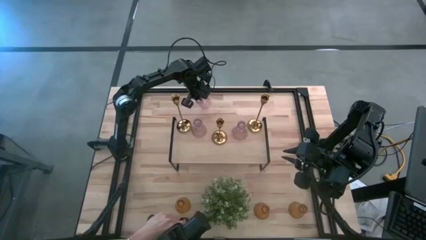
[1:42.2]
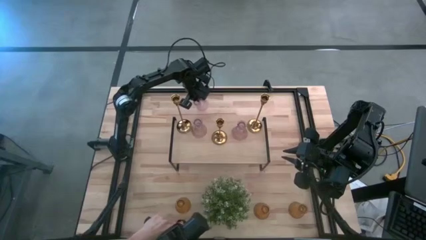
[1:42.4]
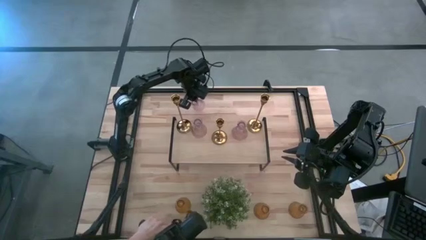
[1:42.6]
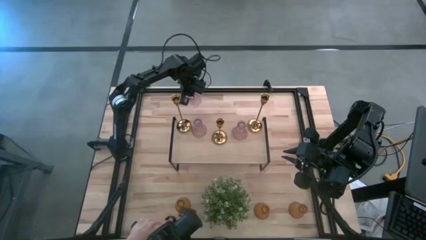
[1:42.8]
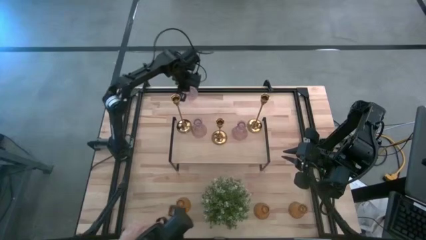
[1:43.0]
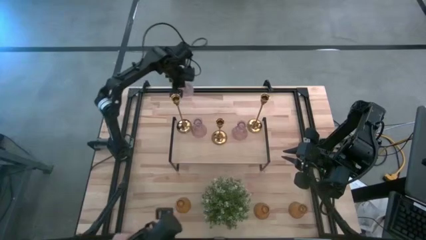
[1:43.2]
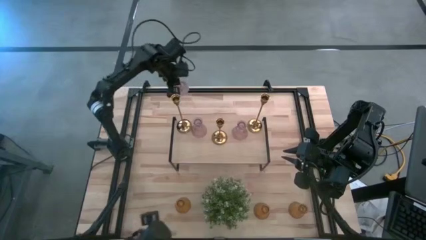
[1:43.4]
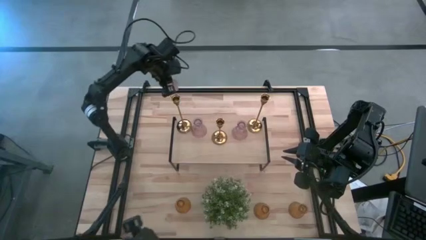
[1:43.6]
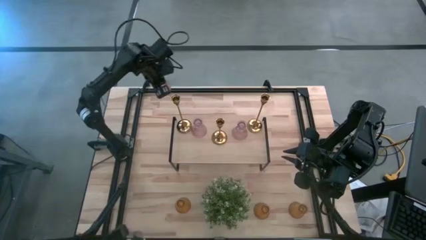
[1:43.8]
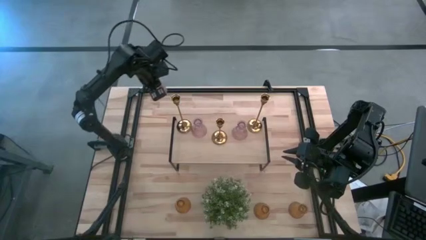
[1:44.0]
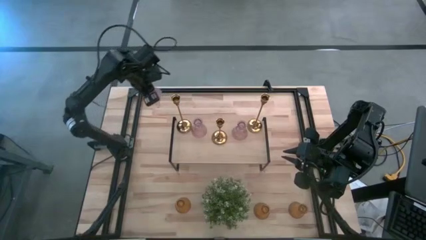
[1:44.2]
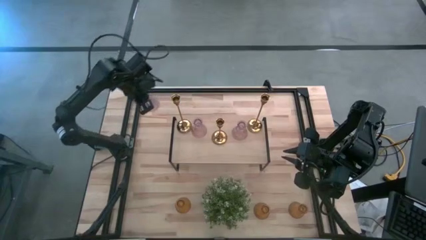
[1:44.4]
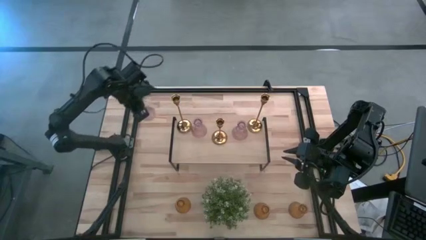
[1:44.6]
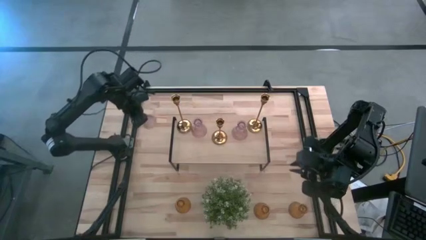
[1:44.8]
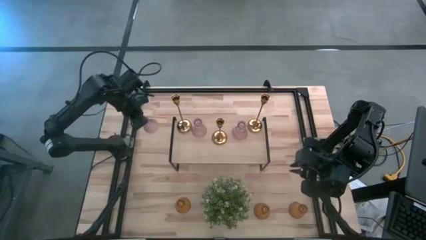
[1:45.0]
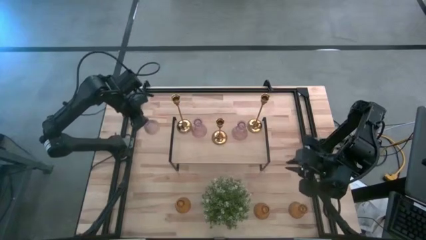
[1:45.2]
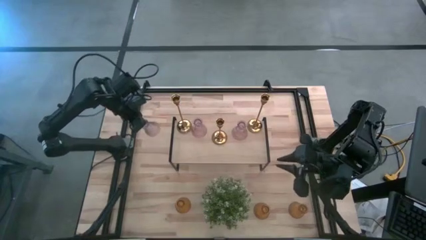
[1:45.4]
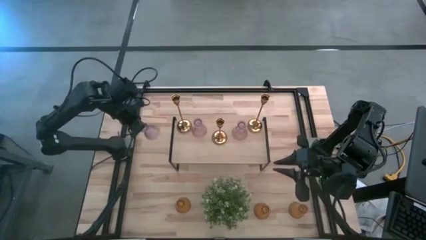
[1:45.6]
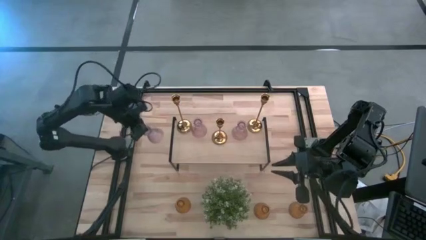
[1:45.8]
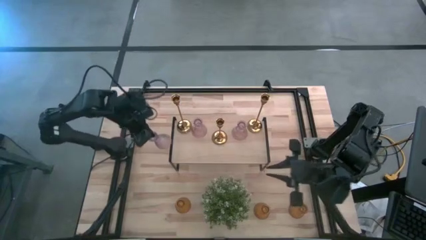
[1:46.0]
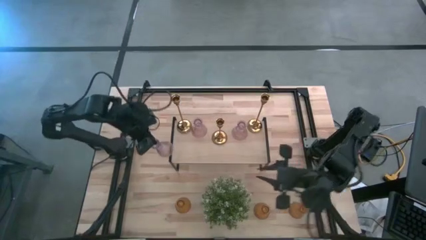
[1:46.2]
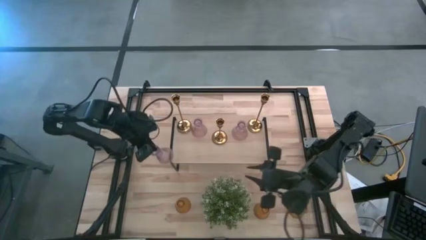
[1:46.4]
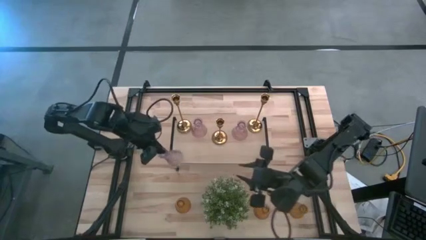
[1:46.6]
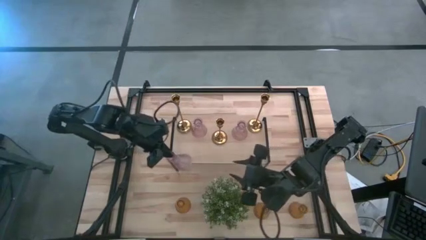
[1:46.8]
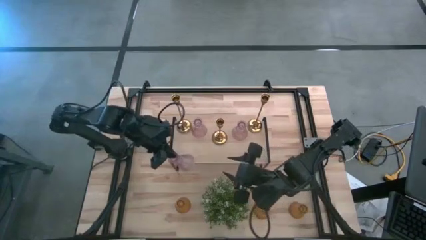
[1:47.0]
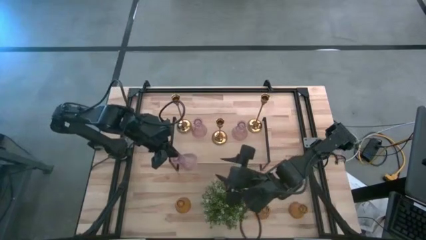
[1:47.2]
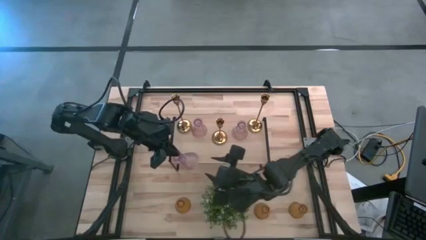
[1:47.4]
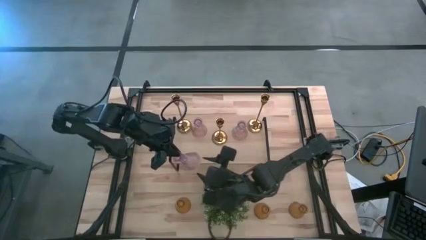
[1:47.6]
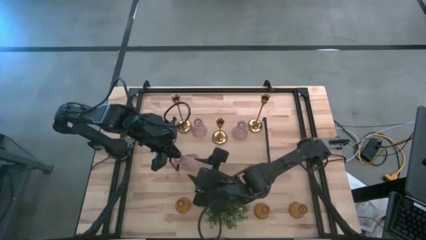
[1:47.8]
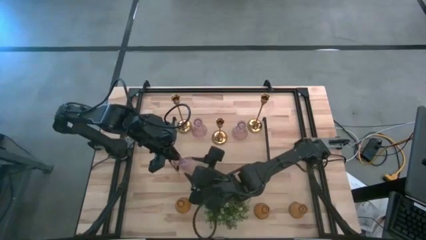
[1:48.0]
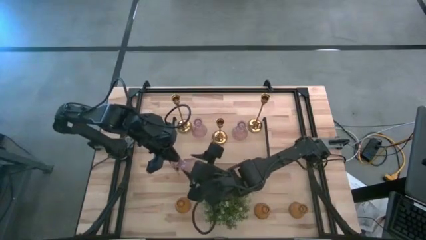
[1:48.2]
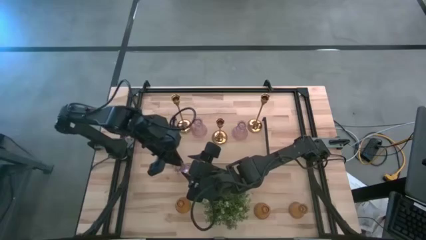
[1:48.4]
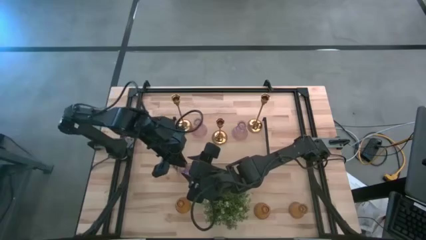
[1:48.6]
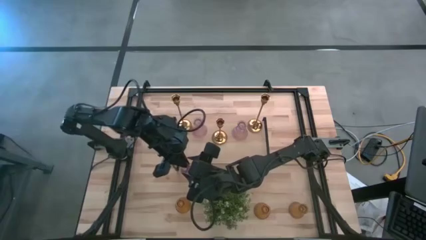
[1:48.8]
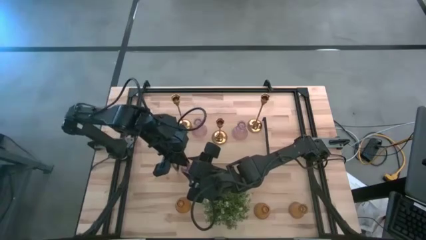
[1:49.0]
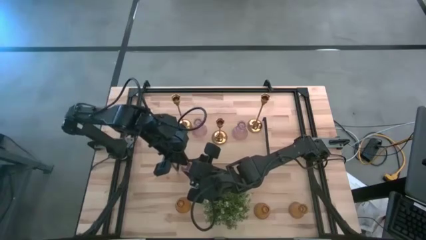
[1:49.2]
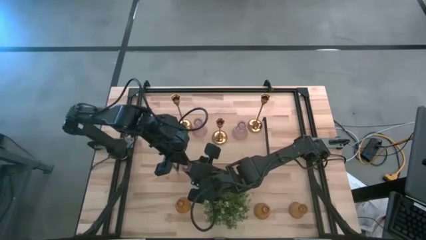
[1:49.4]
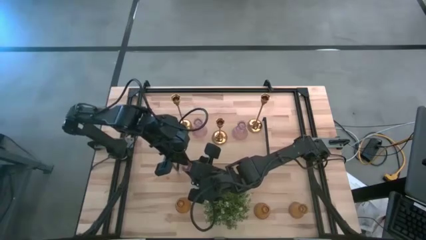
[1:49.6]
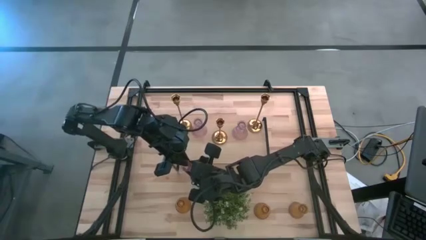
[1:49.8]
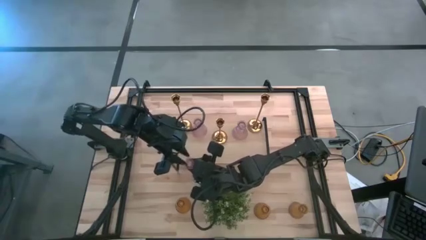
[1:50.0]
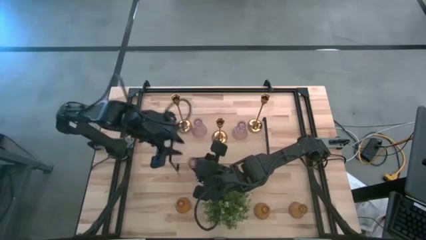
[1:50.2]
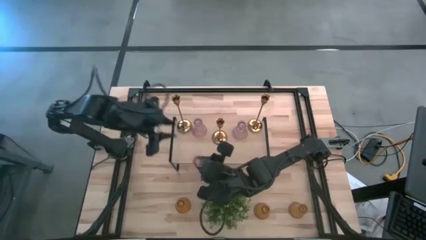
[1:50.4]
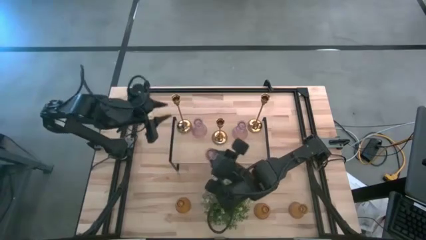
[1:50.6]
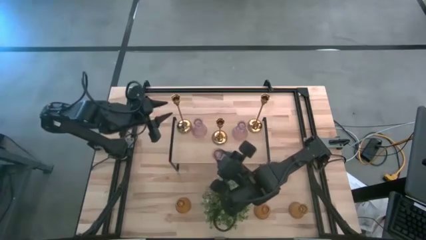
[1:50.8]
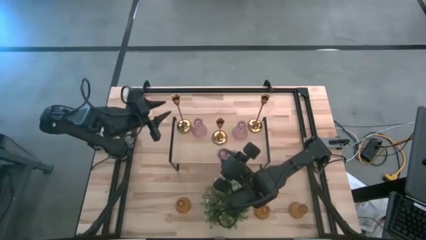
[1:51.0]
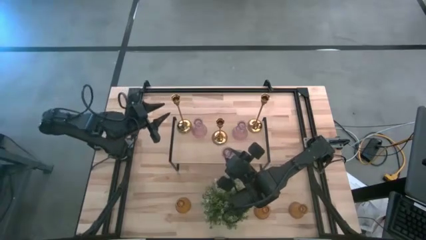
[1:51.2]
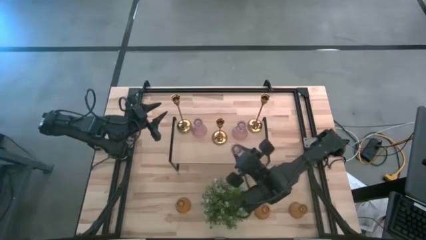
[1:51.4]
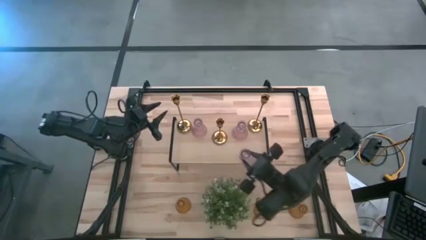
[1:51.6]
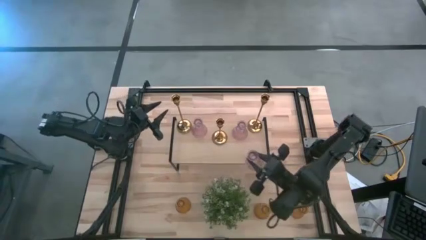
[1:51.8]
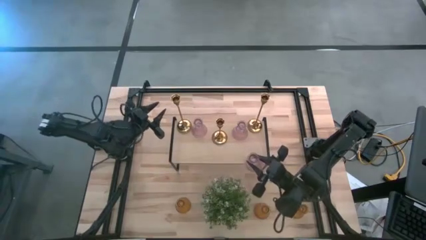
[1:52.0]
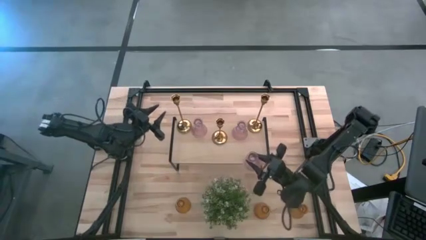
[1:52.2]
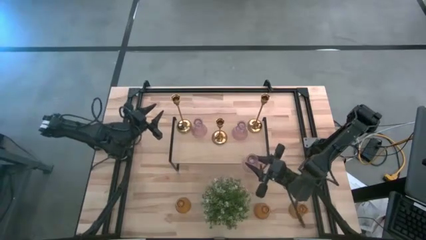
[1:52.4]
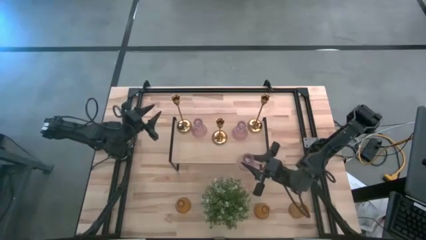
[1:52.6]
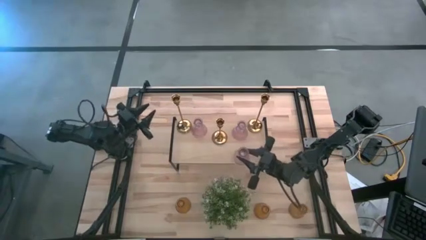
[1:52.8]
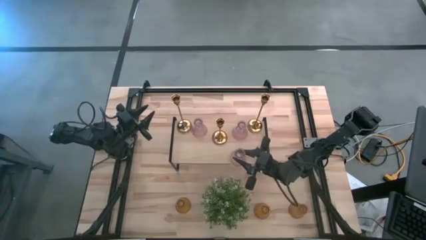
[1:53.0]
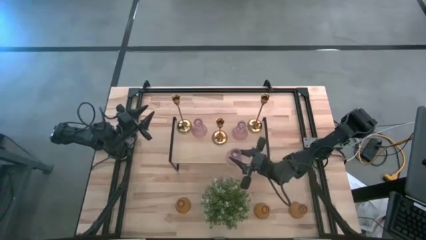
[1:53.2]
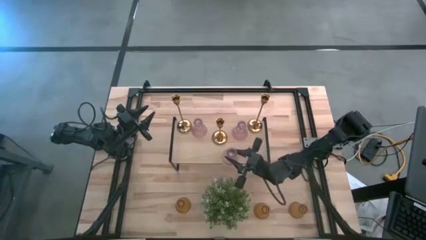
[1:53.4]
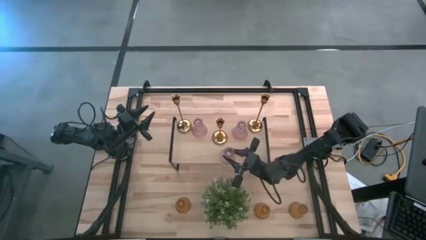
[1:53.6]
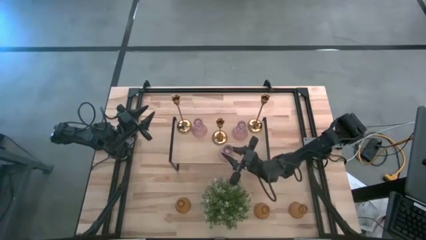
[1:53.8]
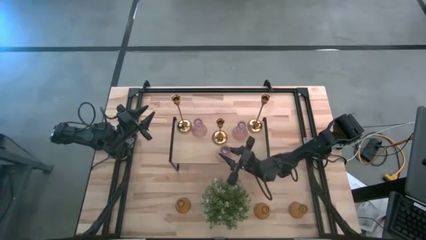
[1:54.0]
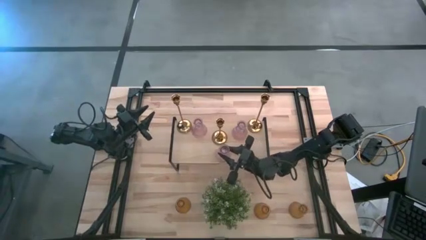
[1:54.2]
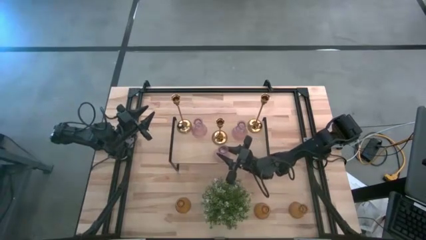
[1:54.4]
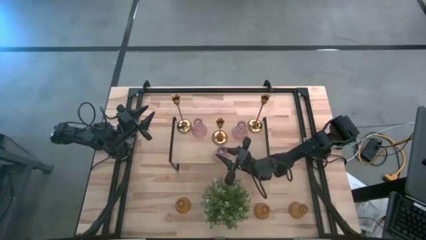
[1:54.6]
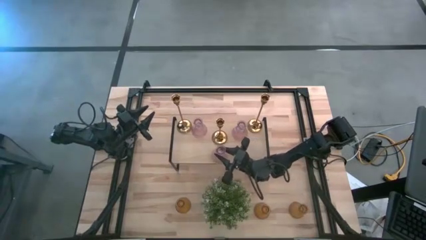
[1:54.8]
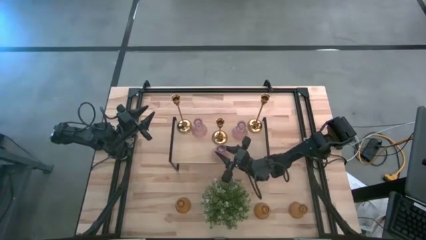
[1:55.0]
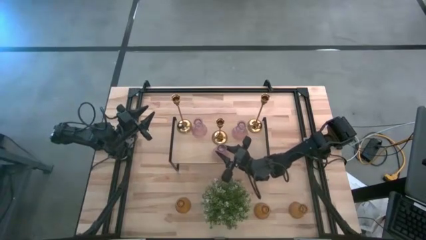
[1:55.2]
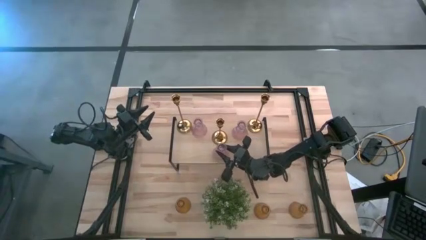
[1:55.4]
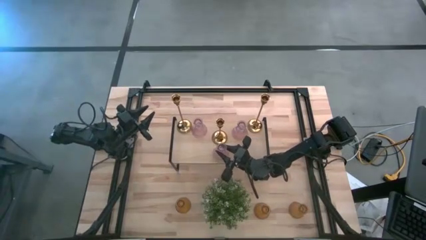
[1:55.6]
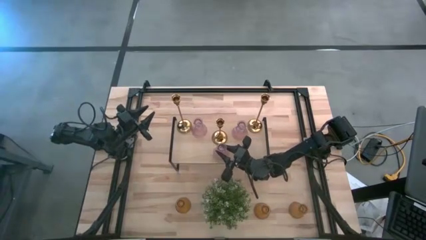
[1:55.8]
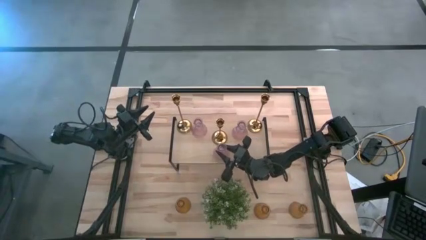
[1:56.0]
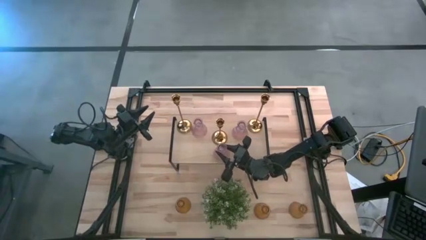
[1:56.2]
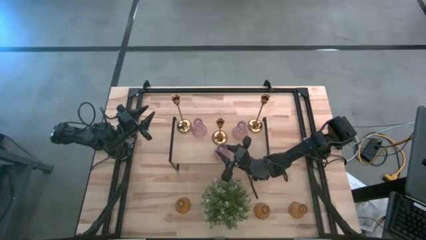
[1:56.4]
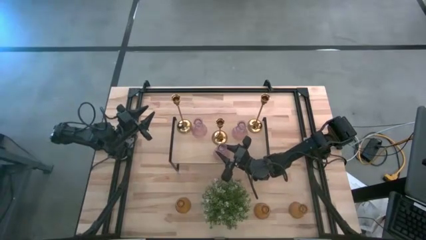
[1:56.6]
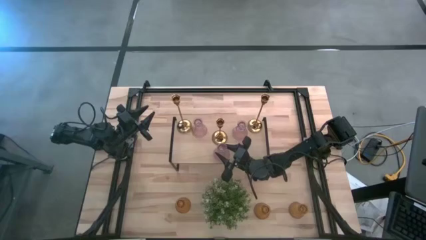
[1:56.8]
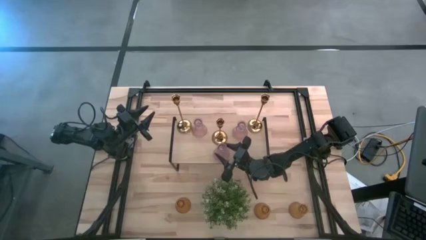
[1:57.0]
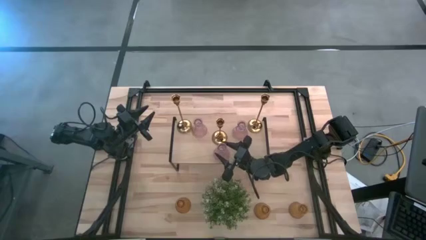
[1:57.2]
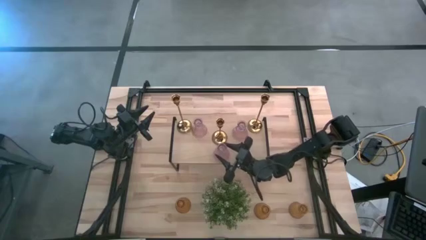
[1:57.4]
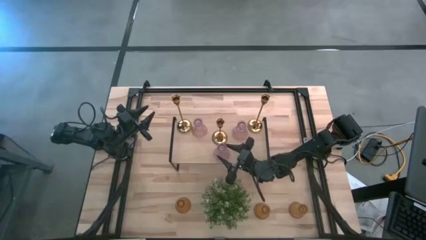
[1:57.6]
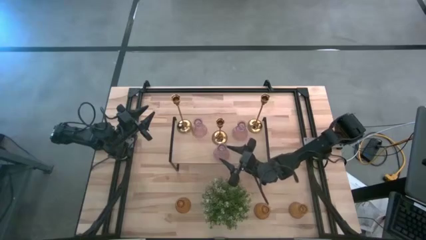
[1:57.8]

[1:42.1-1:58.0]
Task: Pick & Place candle stick holders
Put the pink vase on the shelf
